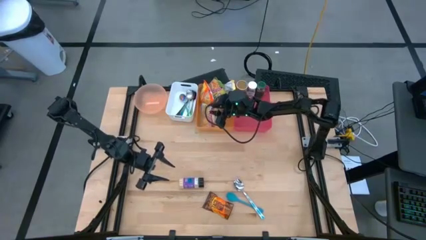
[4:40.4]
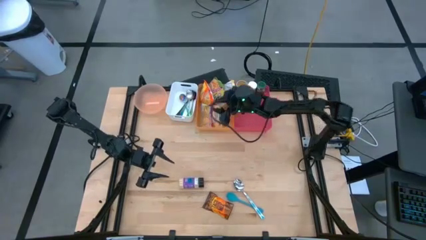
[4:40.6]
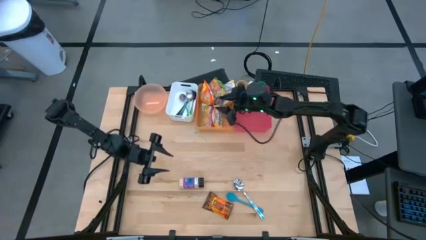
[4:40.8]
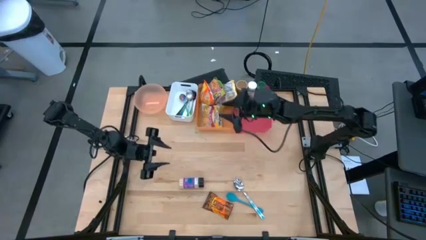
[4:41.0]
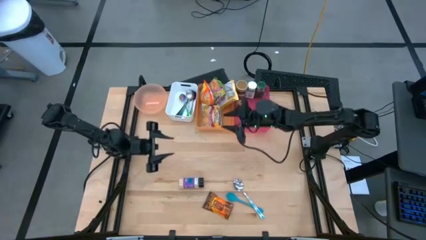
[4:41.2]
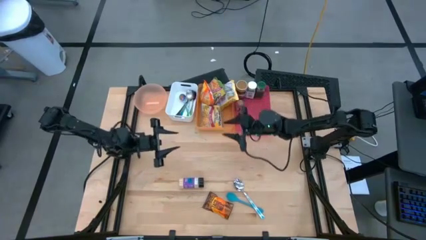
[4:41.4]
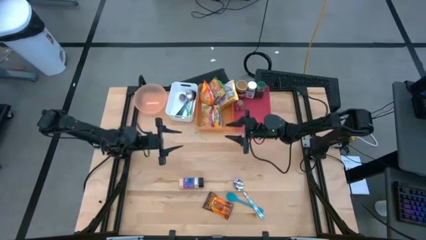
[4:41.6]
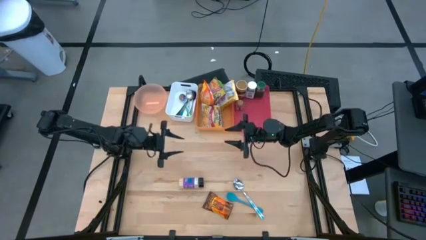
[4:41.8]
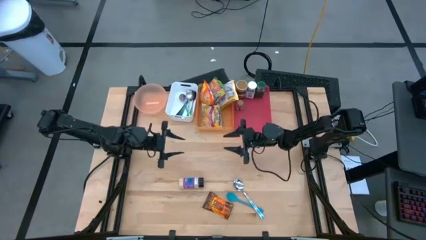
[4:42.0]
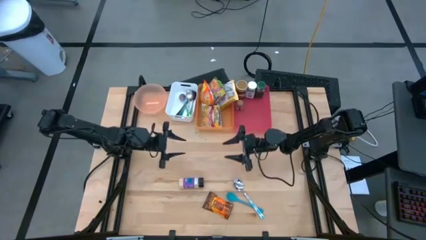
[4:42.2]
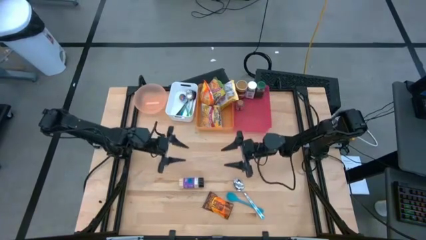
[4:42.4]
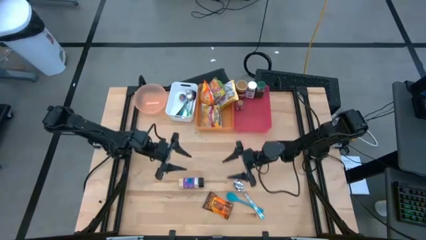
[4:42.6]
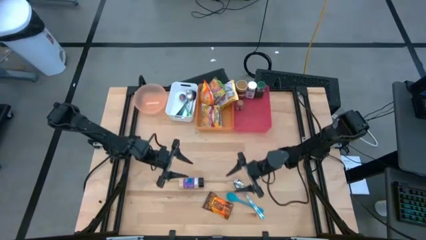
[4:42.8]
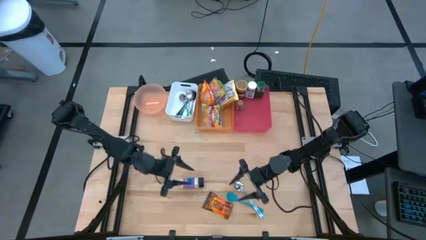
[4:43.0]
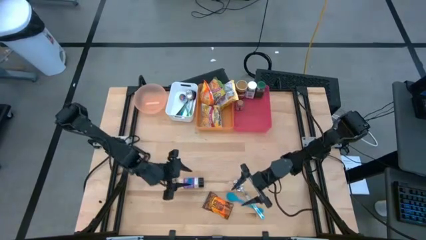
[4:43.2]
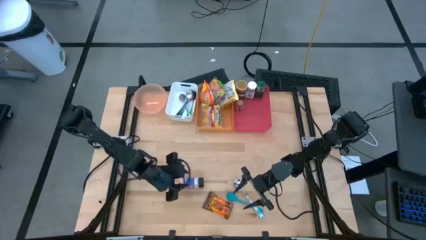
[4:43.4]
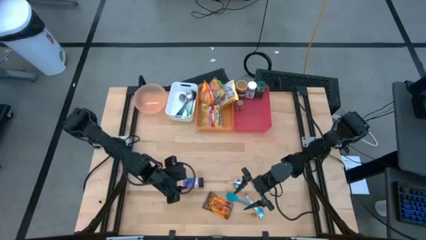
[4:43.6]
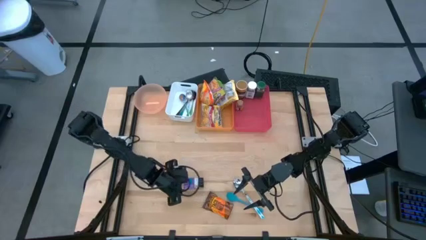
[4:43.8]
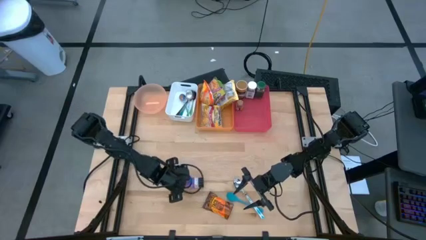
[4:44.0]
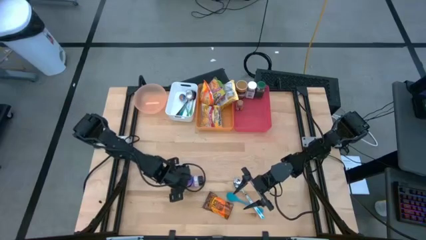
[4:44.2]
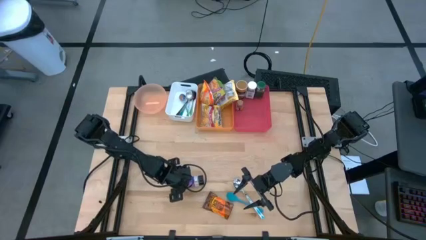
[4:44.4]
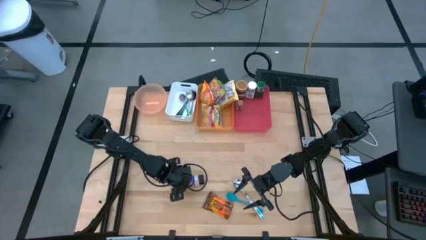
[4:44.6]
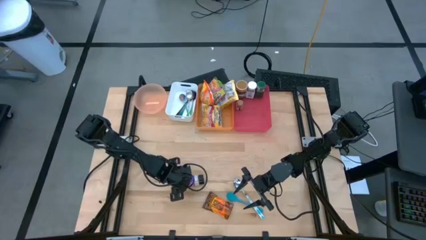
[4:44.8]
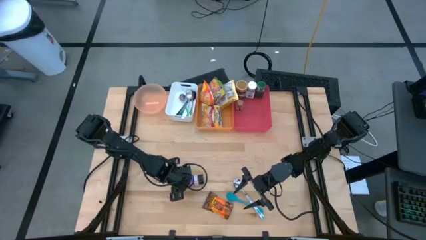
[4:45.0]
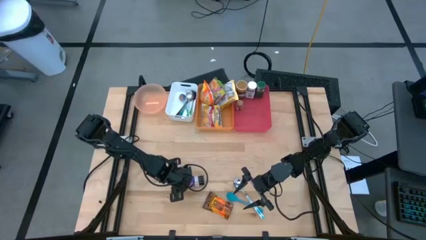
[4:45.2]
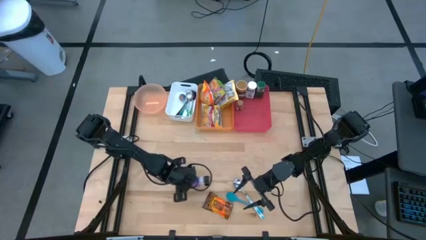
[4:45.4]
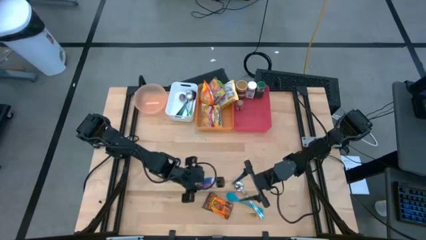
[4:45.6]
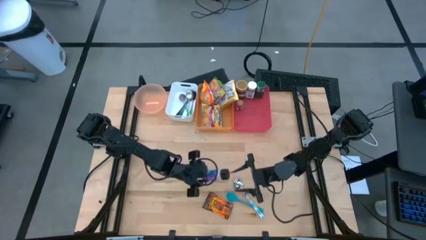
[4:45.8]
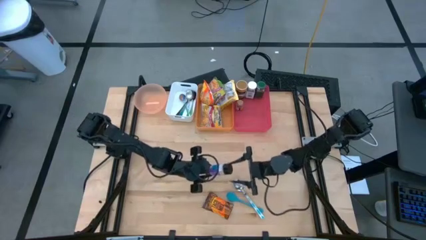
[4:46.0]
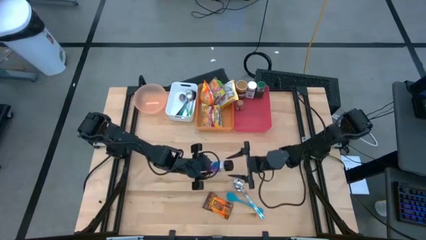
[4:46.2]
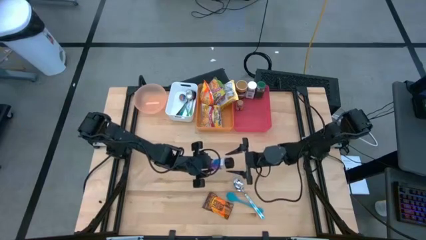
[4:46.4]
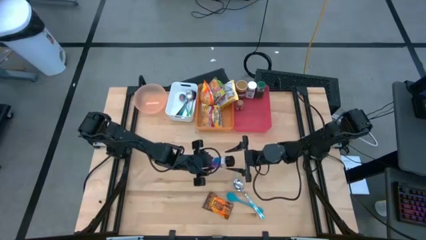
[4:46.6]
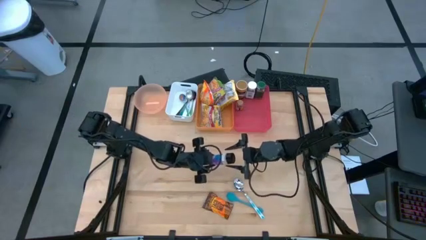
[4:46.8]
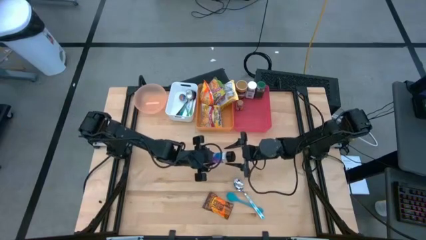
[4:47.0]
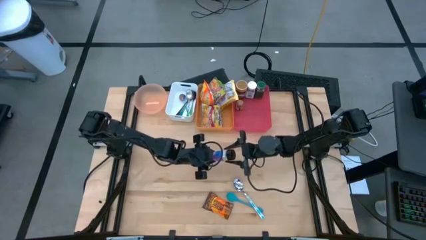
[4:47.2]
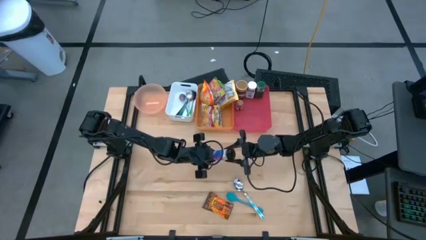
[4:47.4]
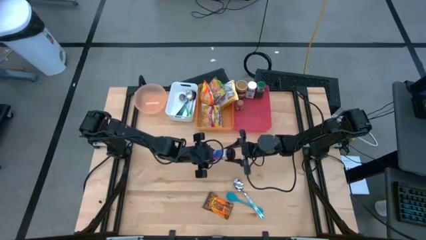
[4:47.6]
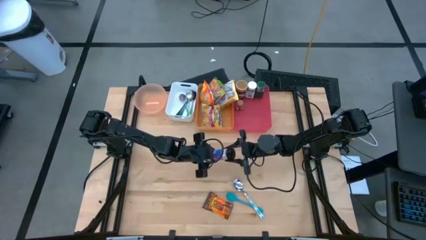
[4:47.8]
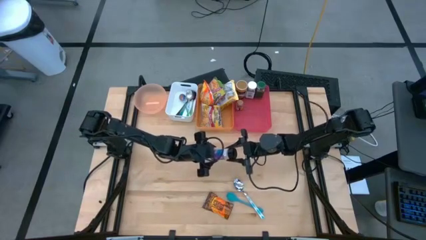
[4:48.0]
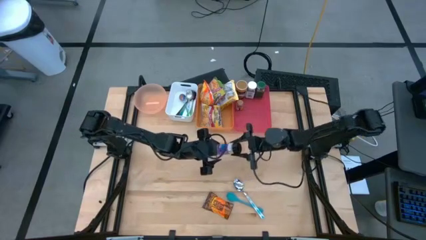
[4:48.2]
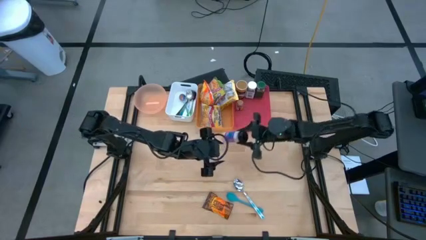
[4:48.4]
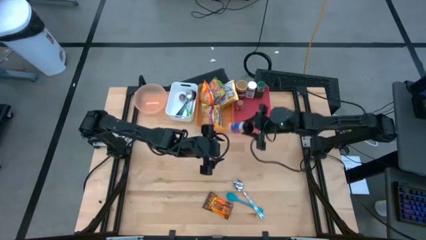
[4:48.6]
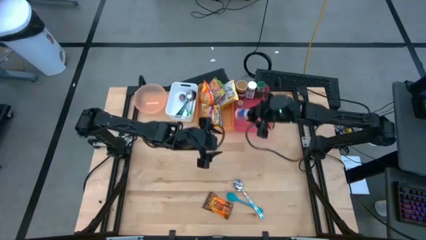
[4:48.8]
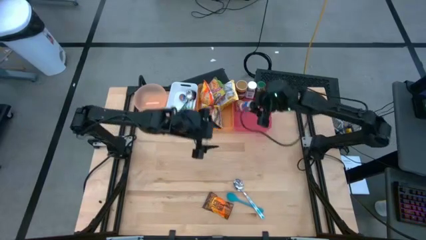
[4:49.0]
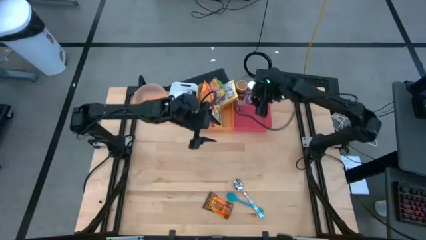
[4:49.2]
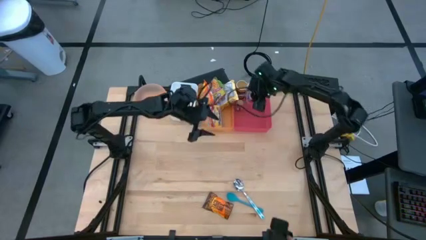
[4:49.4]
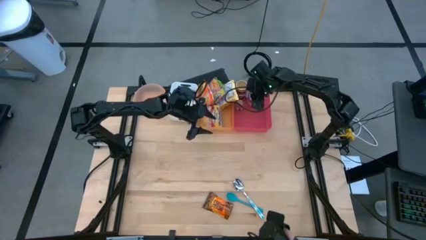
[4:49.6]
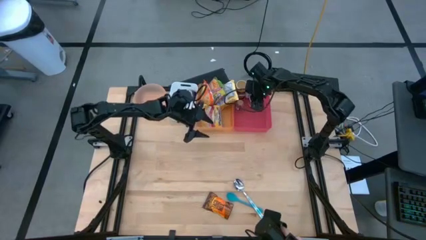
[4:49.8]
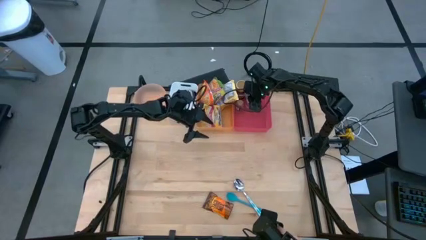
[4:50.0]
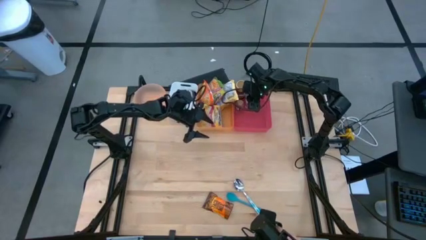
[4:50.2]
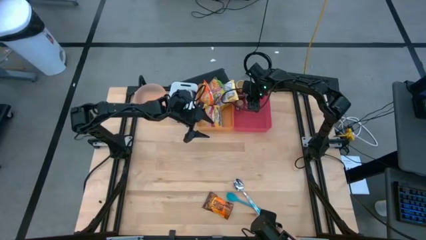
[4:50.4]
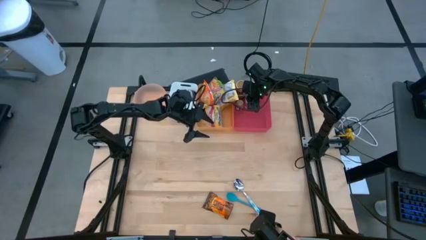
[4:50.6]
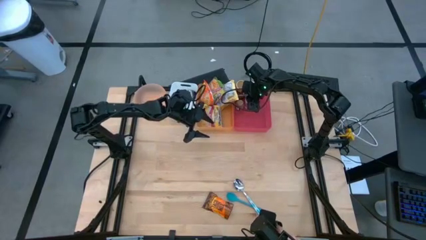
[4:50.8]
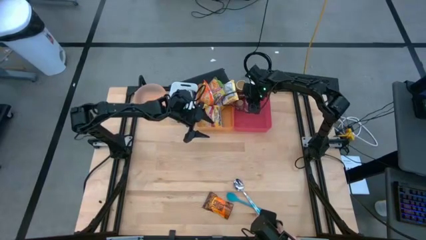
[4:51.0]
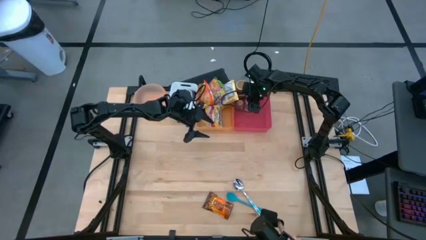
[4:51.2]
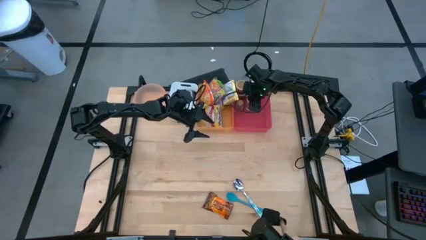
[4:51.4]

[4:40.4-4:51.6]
Task: Pick & Place Food Item
Put the purple seasoning bottle into the red bin

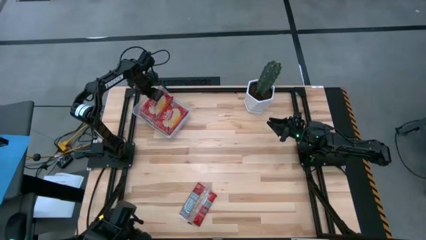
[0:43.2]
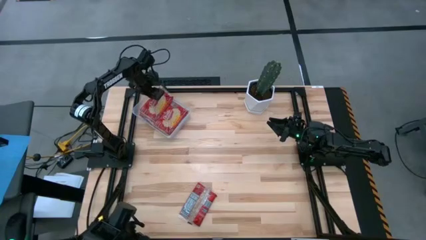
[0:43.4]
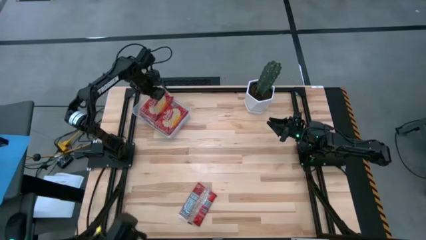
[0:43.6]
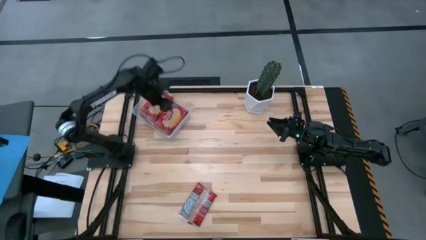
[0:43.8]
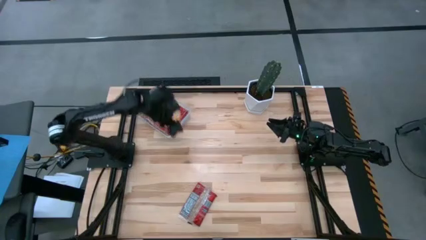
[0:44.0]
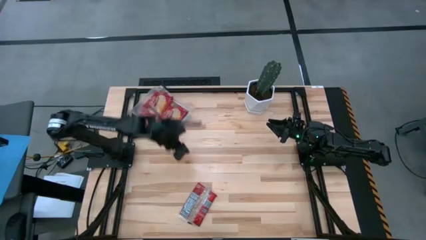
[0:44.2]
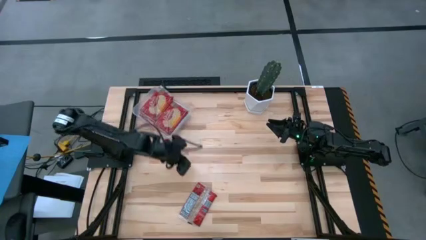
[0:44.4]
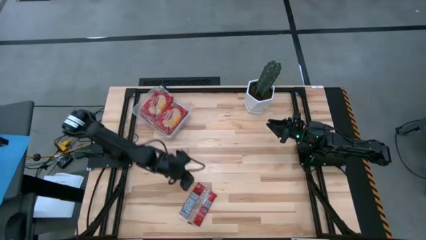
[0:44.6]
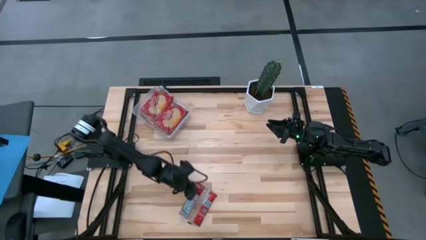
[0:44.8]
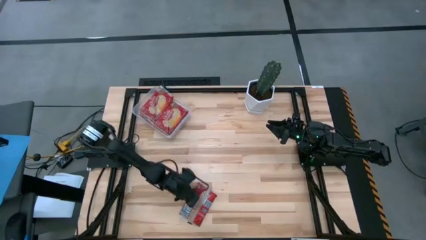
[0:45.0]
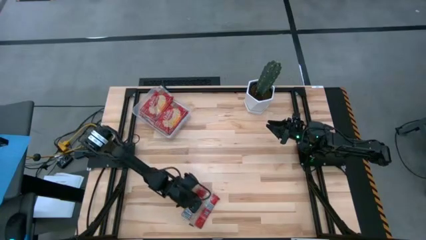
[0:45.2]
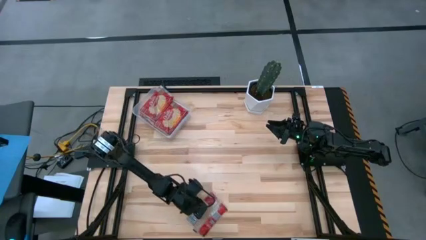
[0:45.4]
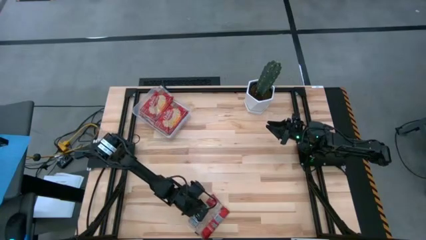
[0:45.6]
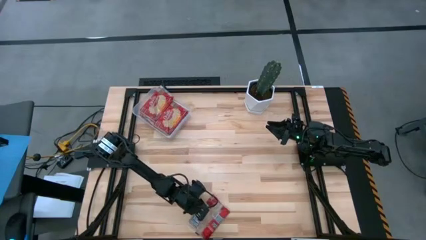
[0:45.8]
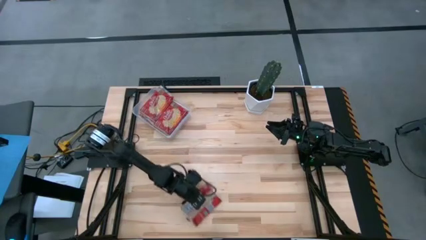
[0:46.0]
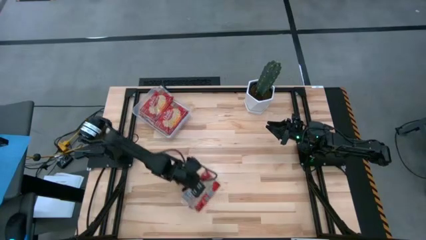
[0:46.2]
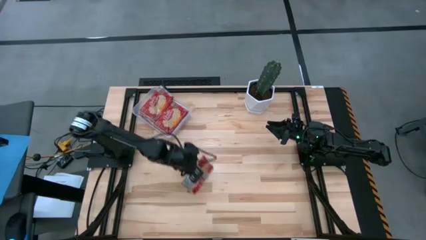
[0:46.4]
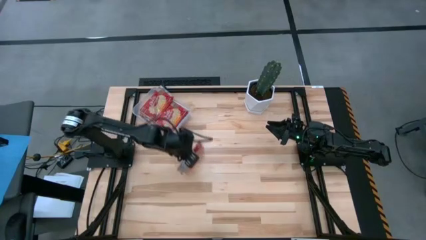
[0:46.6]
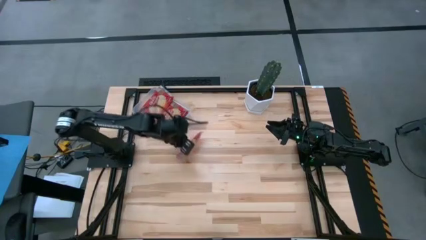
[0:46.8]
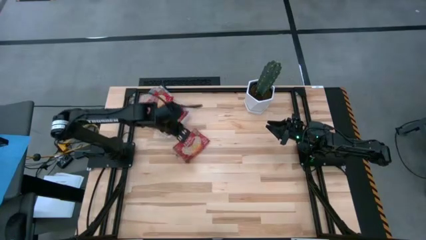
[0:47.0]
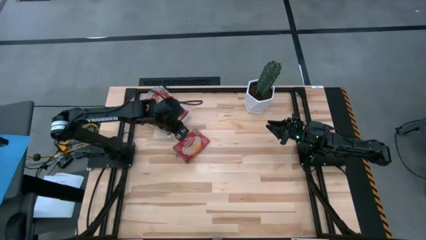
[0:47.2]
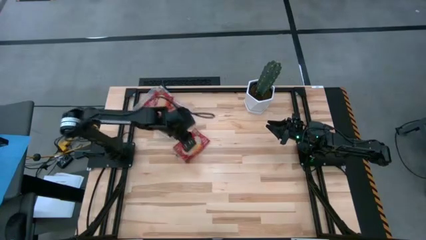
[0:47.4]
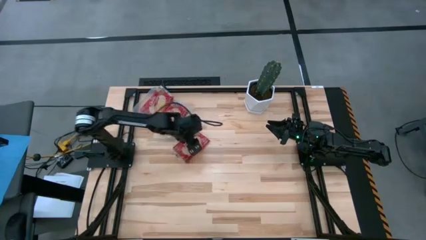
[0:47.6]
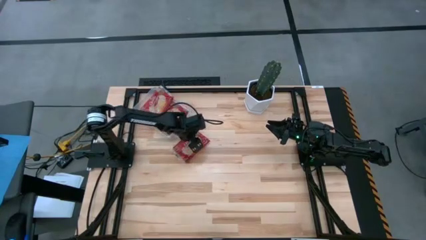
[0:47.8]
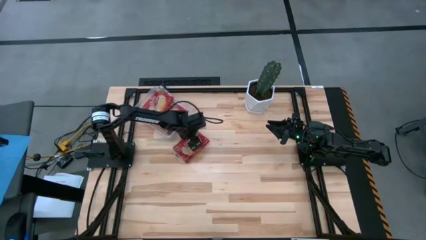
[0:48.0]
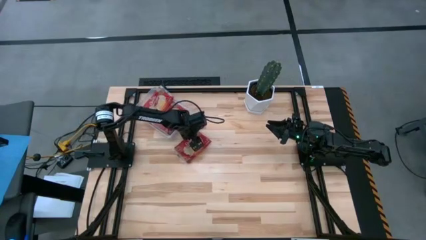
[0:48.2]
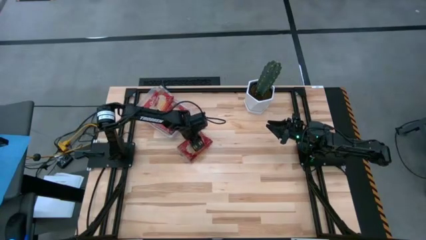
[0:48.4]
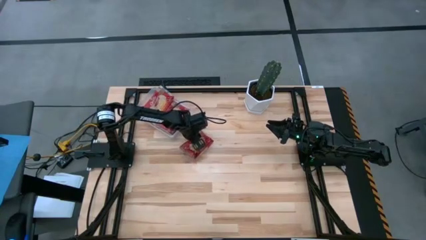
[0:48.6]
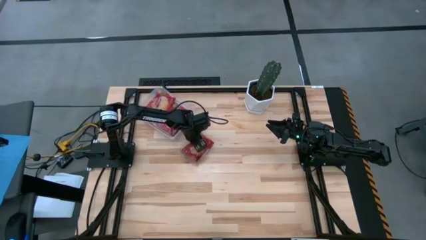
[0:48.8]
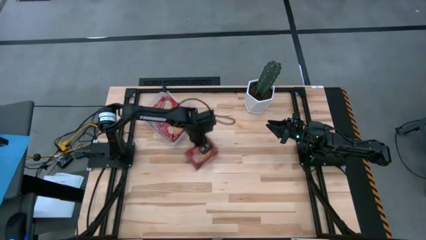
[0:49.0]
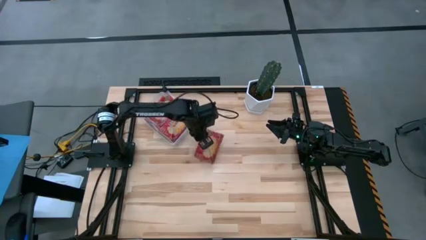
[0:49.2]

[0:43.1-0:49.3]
Task: Sort popcorn bags into baskets
Put the red popcorn bag into the transparent bin
